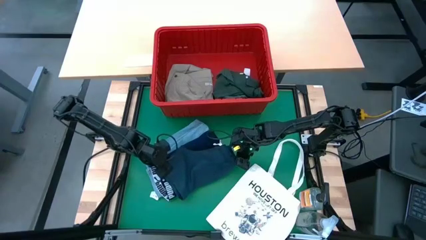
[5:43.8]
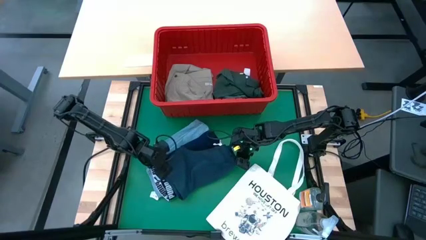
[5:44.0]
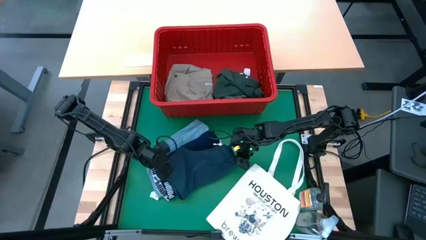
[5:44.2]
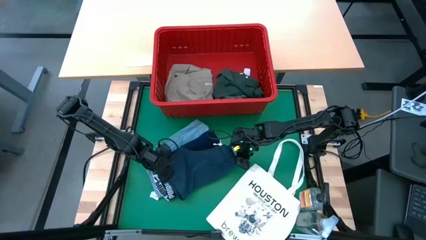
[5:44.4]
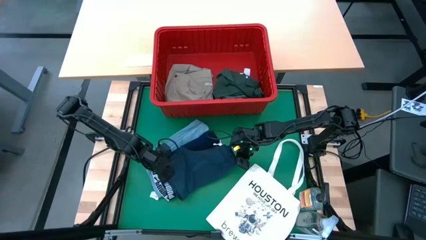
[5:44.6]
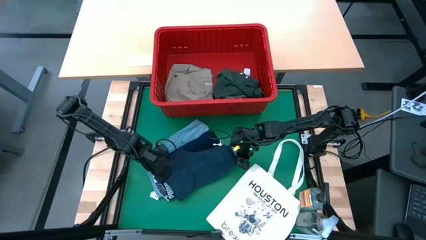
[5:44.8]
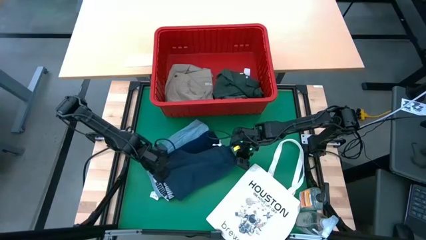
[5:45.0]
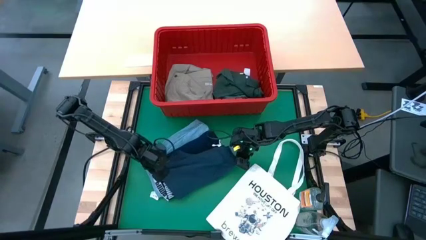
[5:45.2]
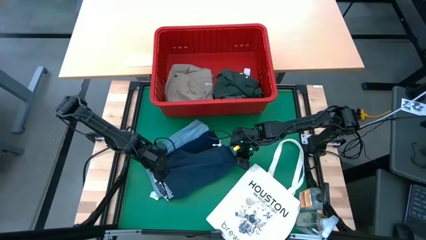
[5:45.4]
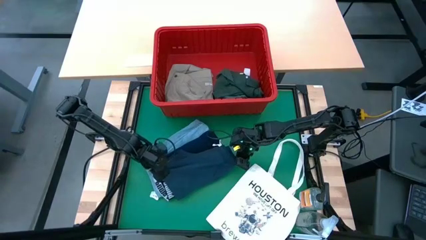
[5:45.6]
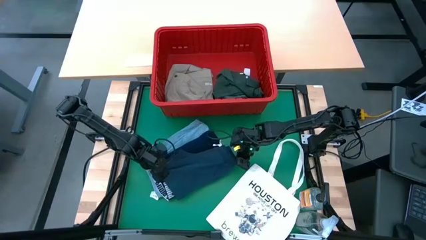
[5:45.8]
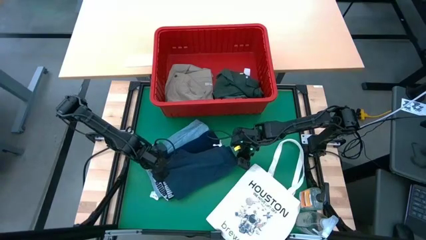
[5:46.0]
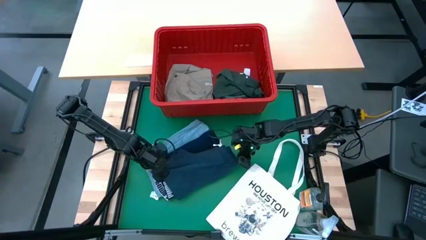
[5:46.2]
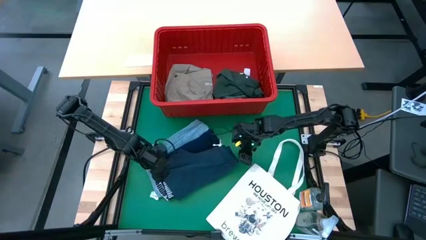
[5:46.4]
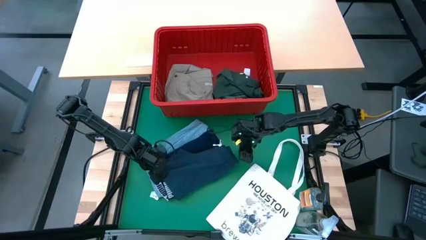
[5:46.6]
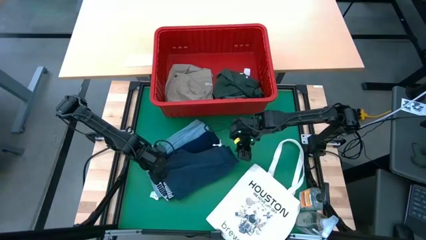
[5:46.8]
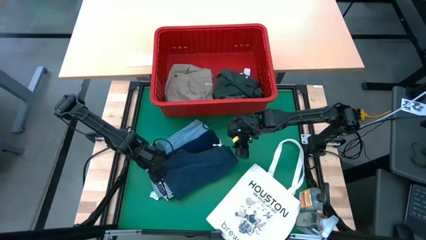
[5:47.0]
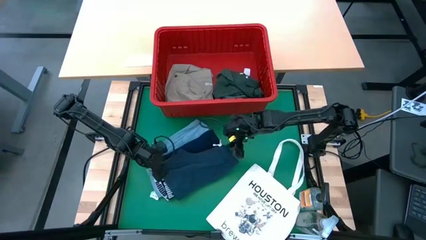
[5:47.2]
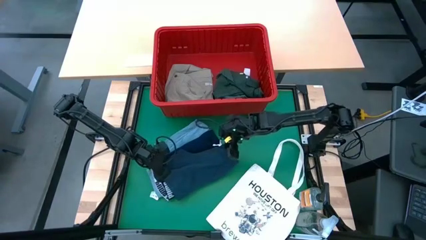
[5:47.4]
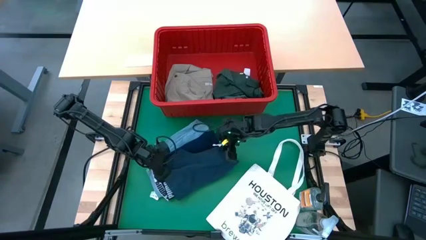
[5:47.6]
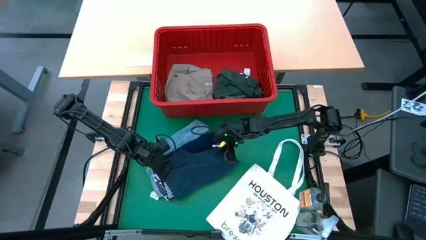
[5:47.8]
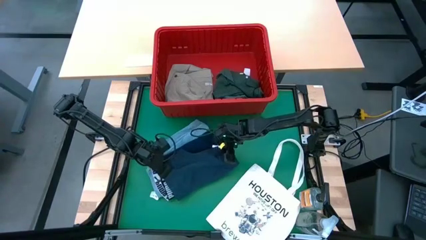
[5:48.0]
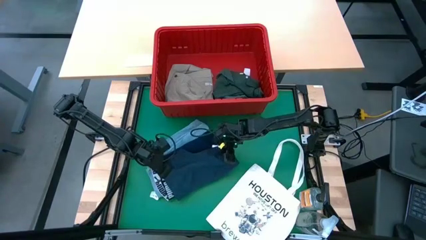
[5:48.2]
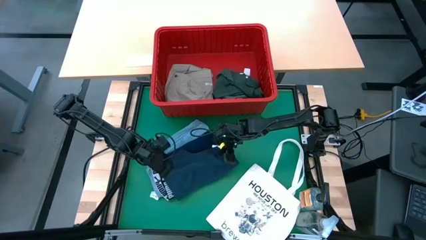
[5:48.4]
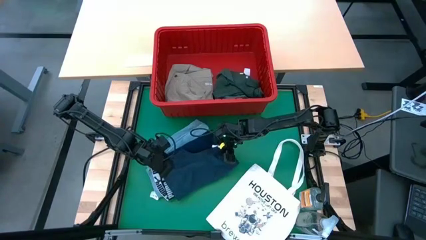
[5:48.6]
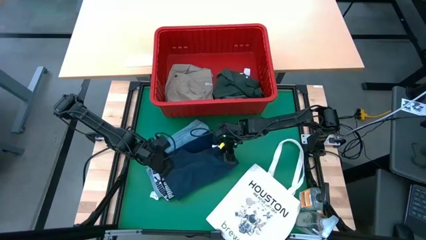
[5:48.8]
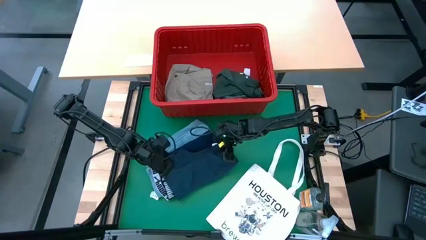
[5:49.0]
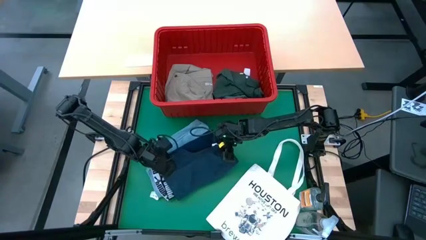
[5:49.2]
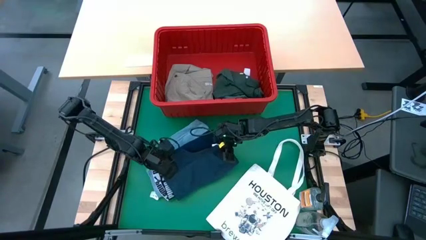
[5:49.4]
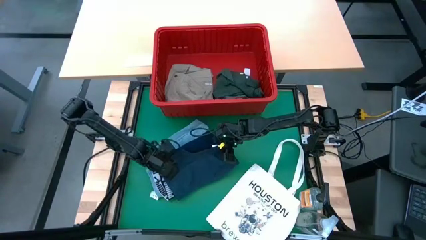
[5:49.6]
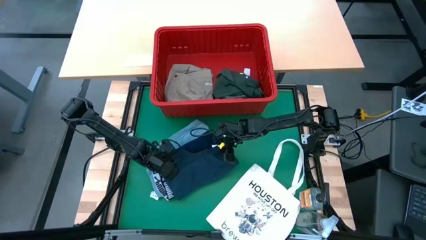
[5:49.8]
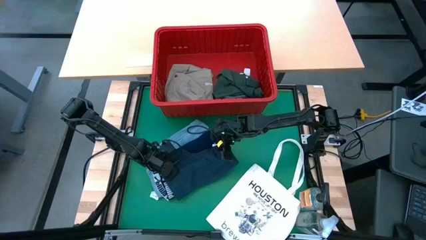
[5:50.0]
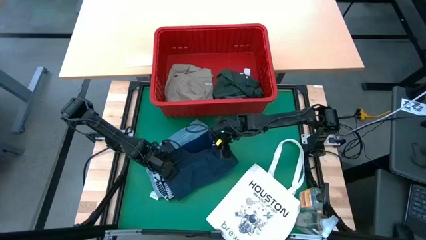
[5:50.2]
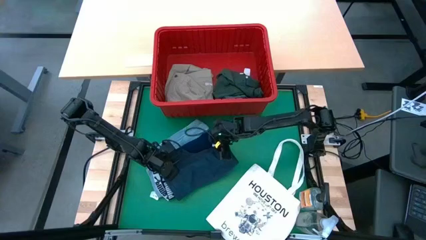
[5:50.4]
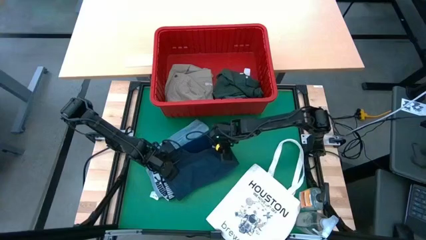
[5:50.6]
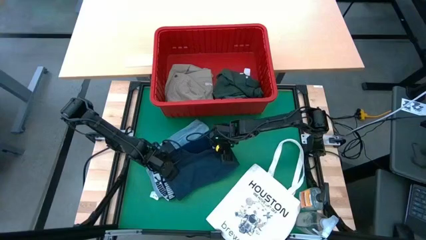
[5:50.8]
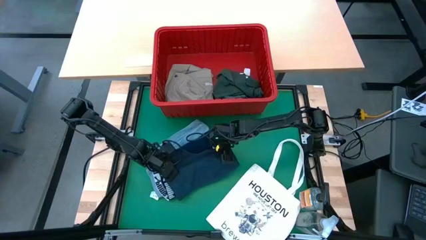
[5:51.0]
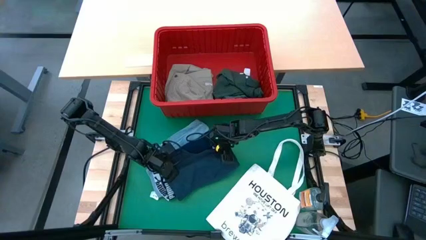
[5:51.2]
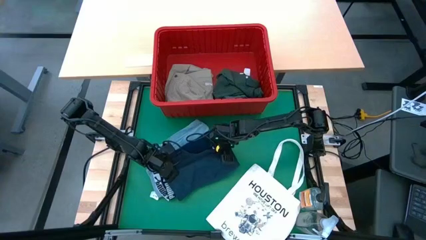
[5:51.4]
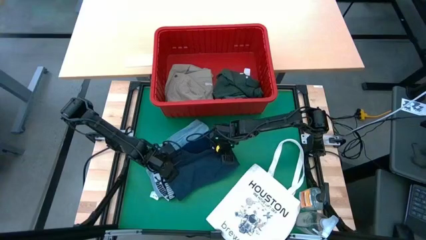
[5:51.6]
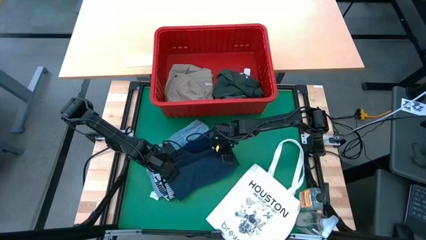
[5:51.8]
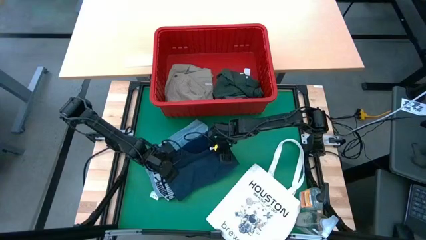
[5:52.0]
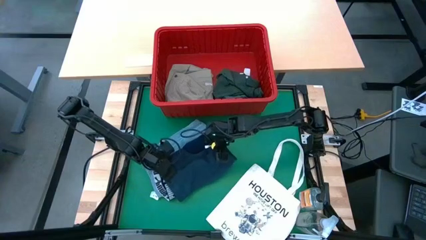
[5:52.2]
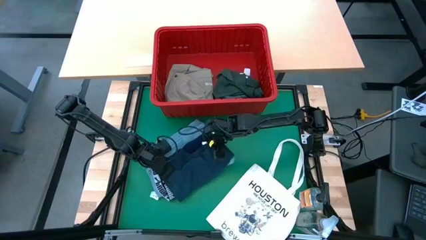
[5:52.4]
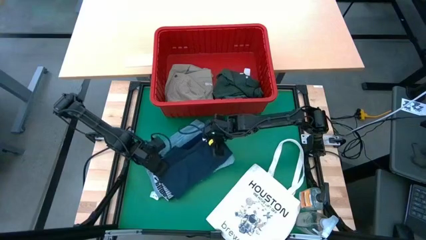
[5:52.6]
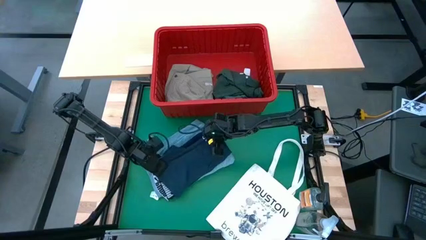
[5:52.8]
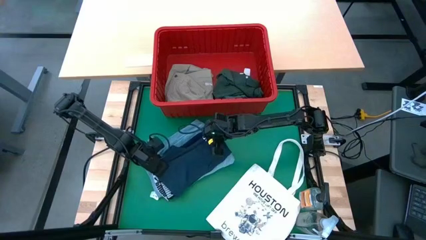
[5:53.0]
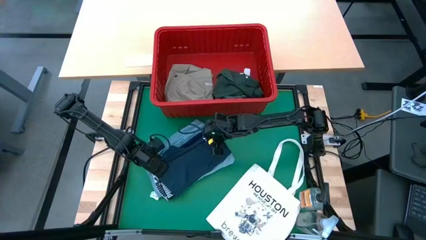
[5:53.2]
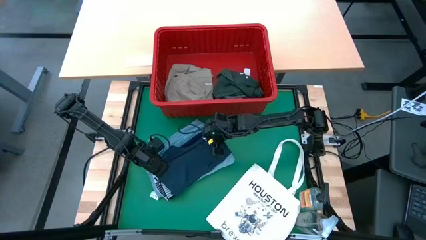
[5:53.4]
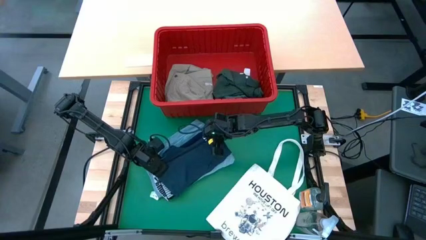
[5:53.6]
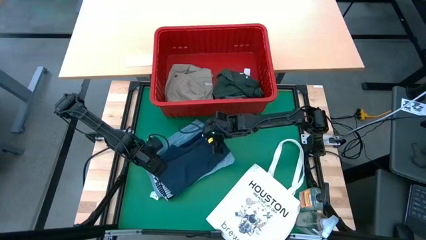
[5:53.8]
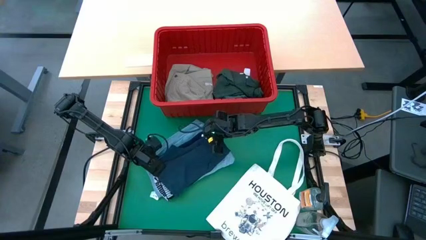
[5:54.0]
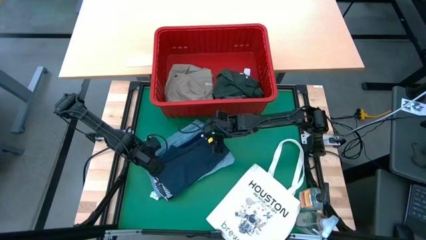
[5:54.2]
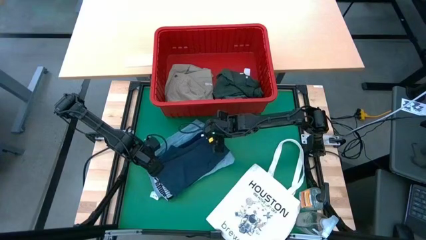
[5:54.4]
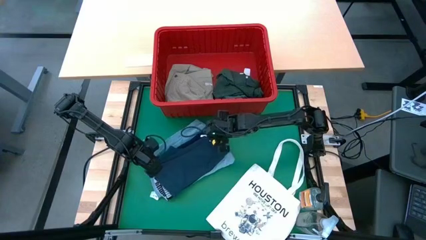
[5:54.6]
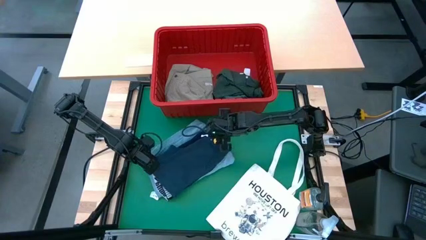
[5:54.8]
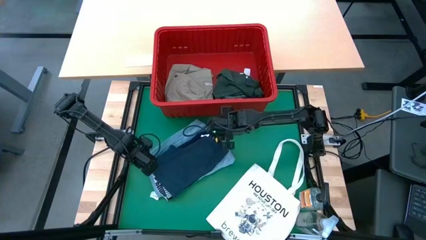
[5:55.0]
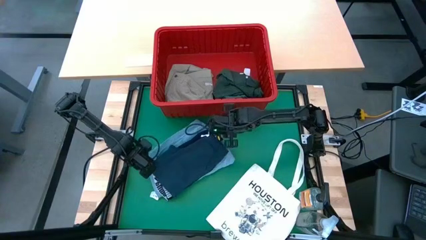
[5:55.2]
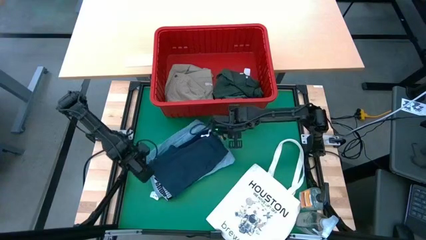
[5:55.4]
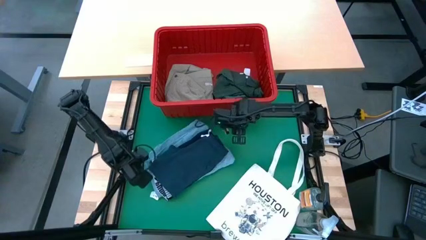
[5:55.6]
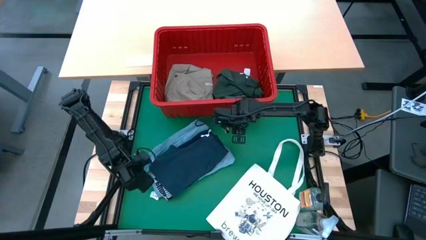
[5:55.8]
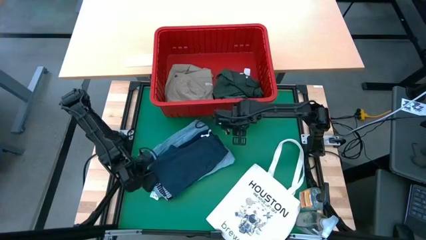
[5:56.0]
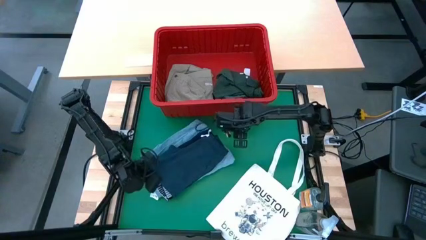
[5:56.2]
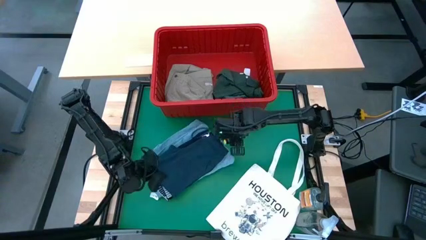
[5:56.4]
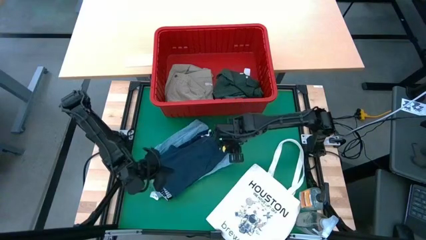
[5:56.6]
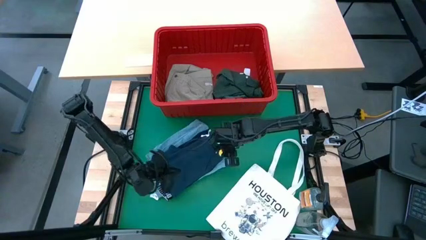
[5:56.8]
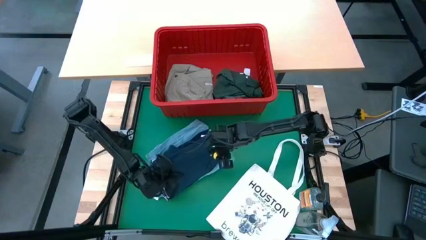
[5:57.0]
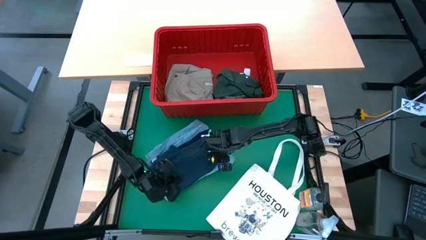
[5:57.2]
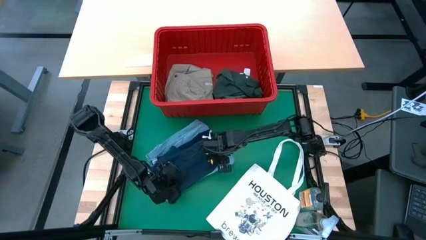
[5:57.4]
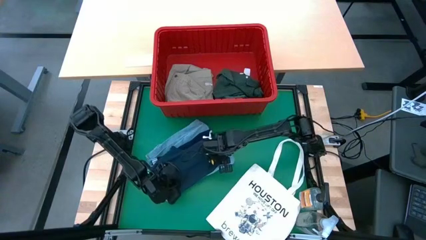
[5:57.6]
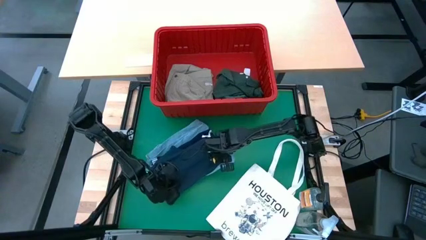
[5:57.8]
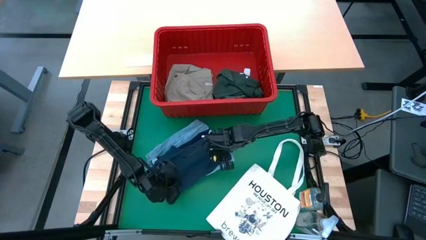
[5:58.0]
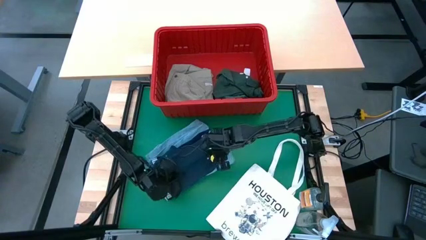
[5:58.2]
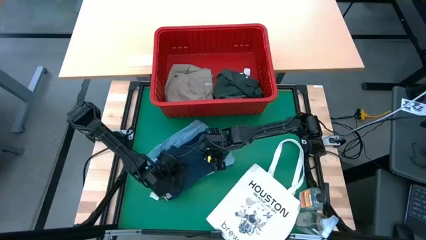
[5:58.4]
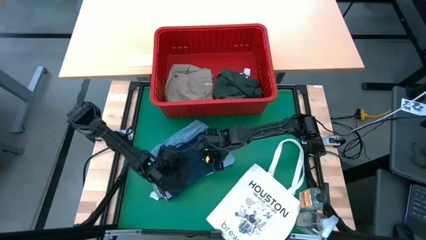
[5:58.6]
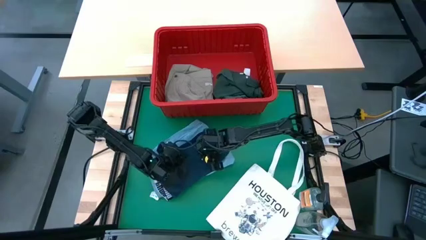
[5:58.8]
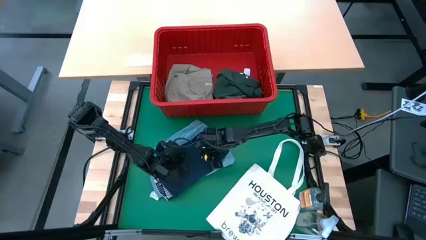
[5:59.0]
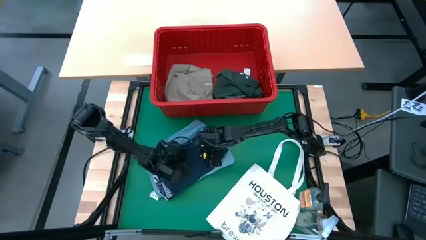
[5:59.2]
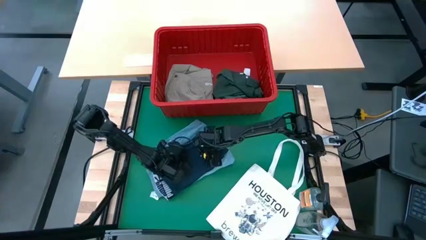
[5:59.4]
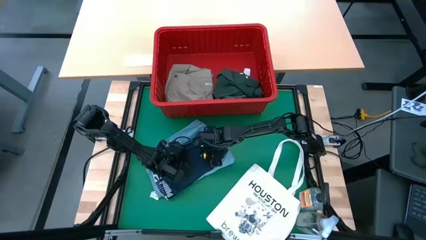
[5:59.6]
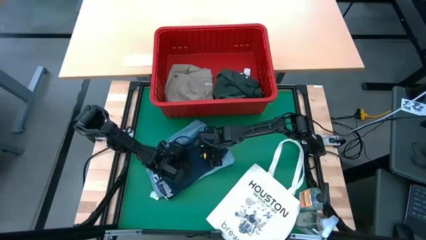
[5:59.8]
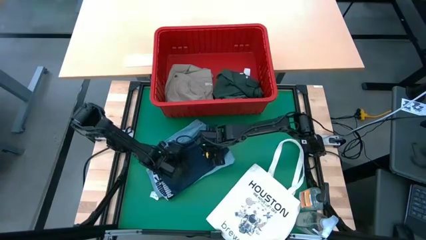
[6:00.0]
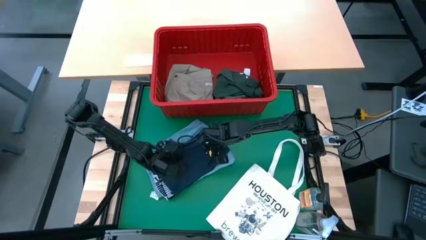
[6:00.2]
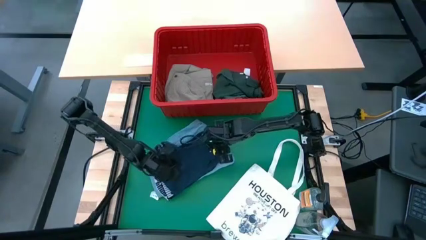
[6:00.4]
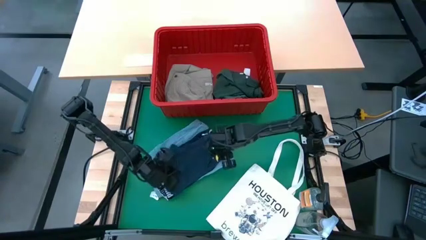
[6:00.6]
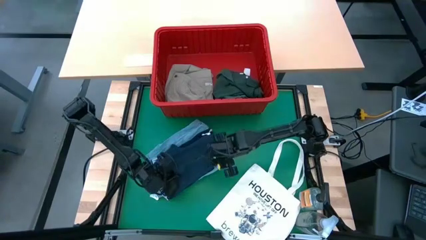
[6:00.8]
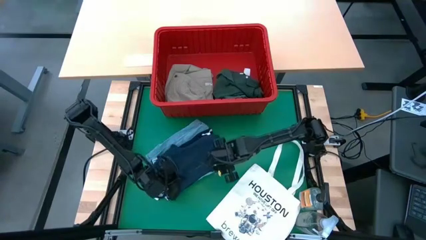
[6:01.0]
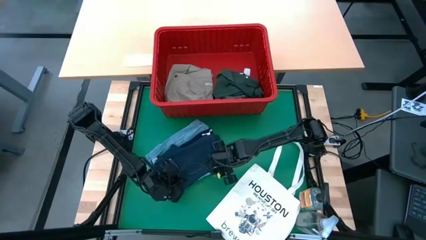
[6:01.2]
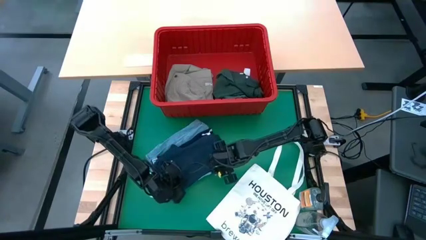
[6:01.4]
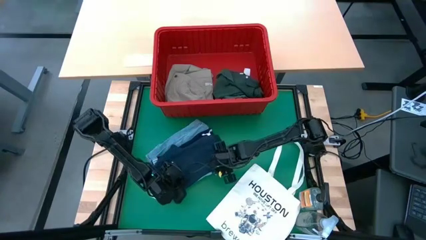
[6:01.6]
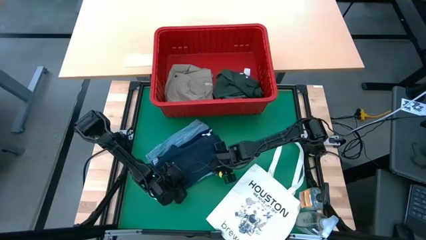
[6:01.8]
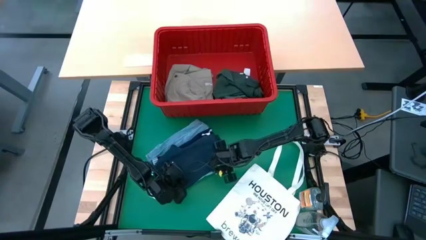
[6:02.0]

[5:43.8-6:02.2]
Task: Fold Laundry from Bin
Fold the gray shorts
